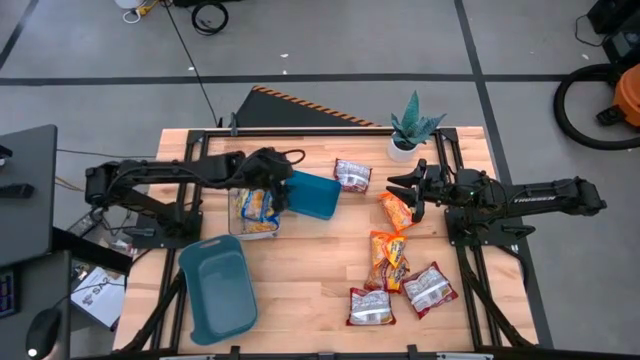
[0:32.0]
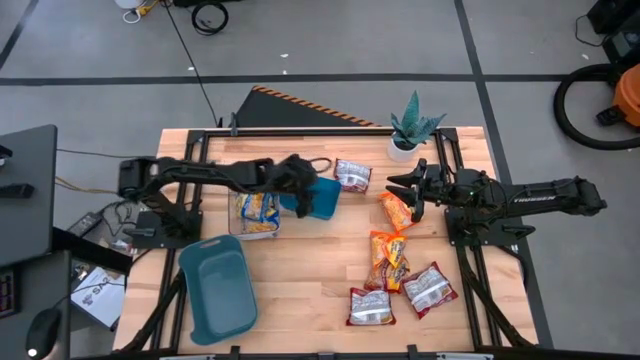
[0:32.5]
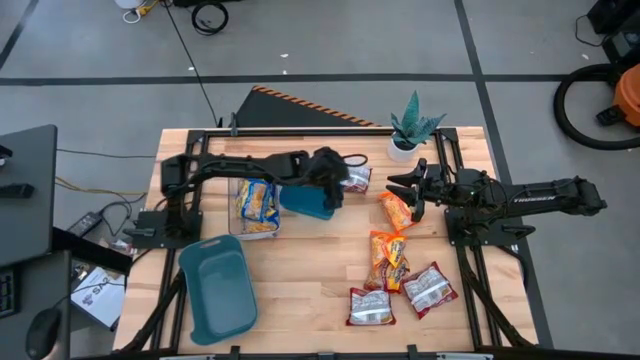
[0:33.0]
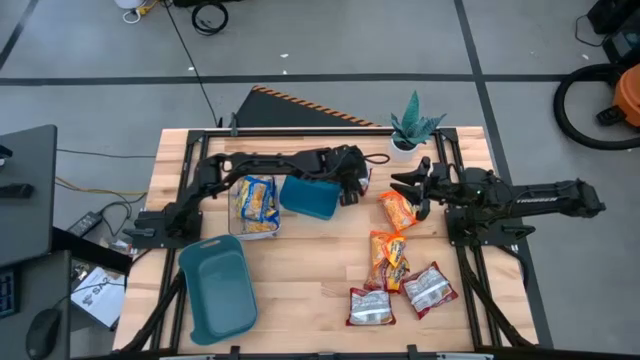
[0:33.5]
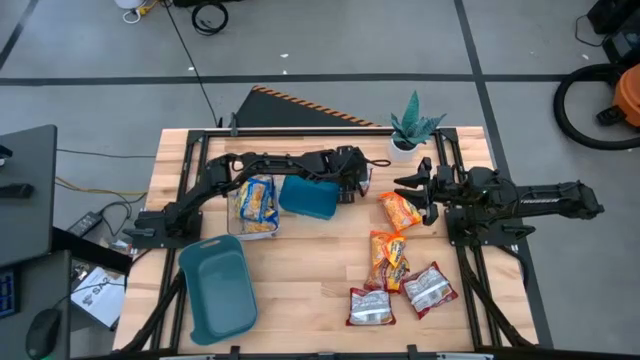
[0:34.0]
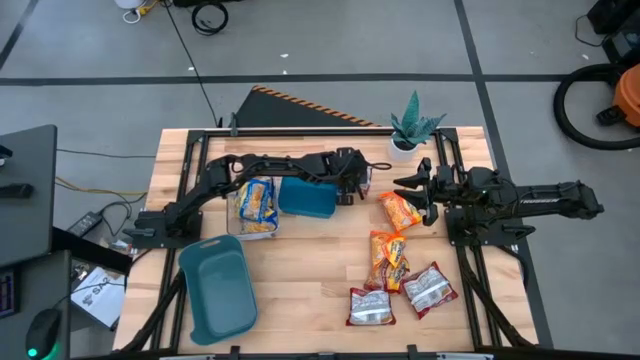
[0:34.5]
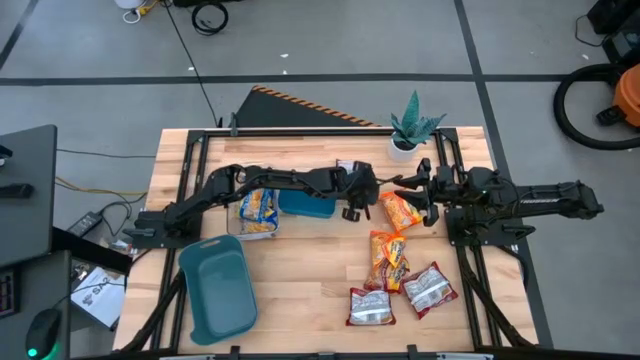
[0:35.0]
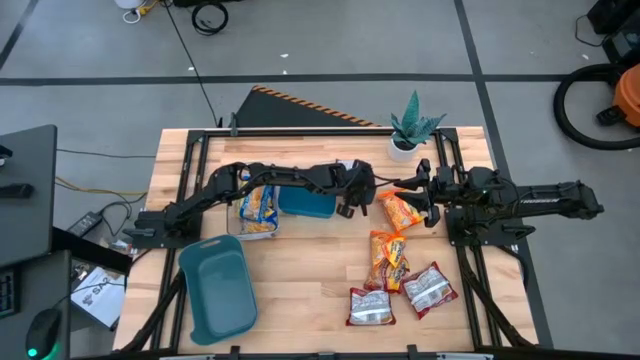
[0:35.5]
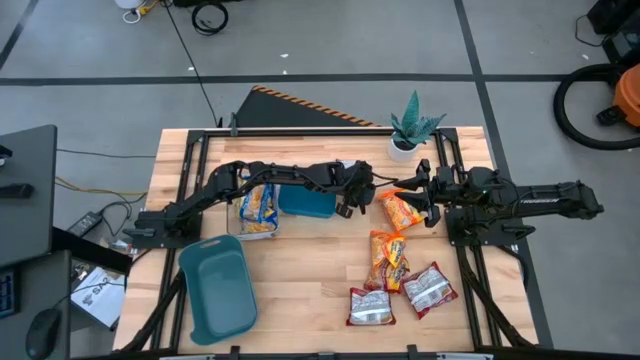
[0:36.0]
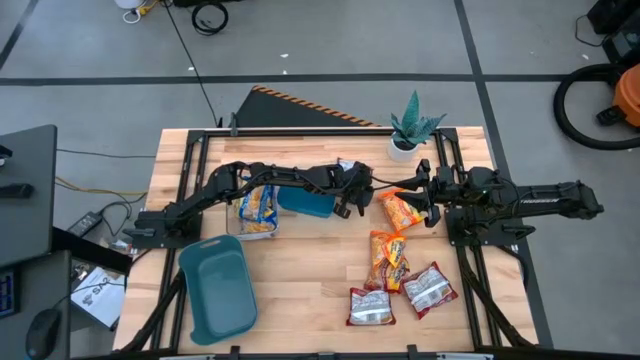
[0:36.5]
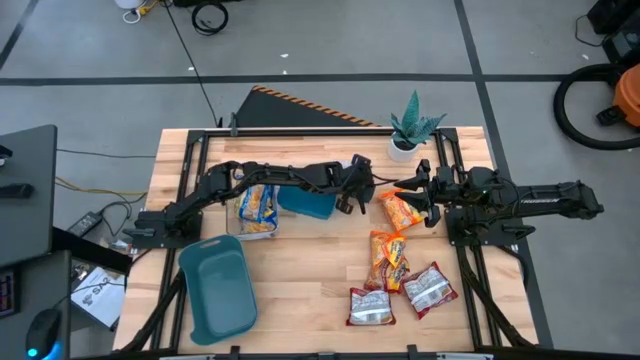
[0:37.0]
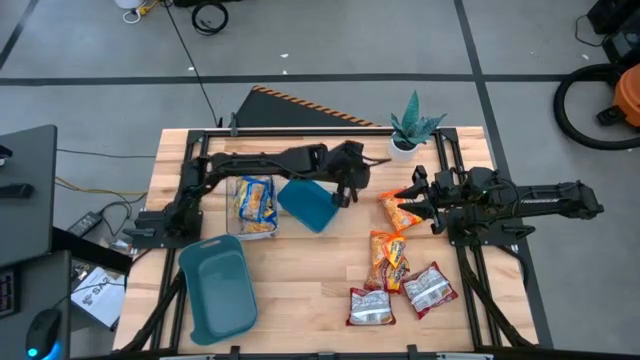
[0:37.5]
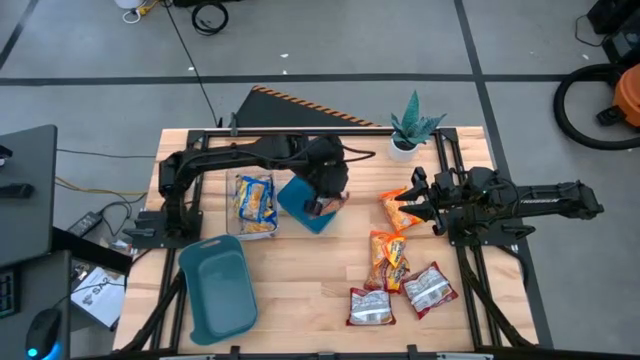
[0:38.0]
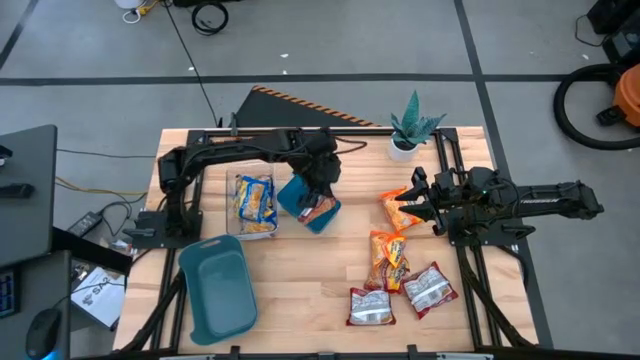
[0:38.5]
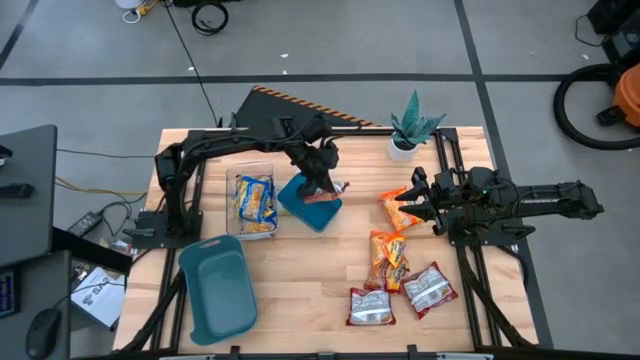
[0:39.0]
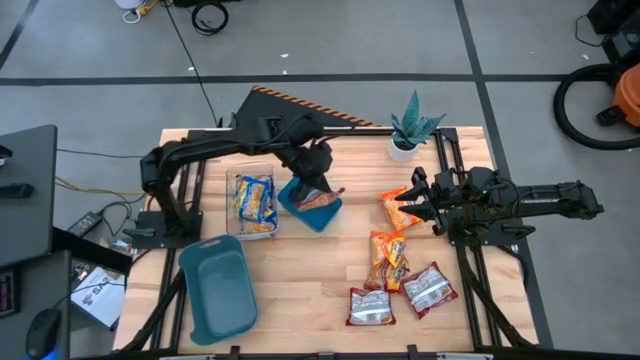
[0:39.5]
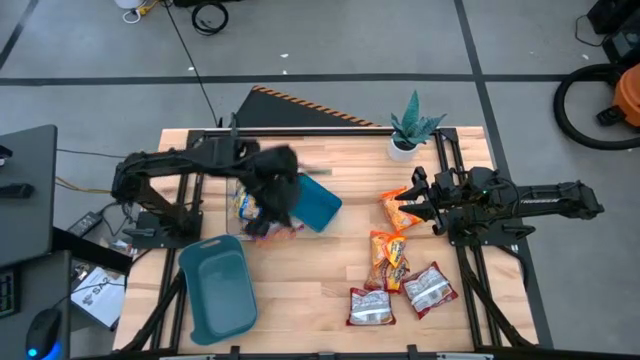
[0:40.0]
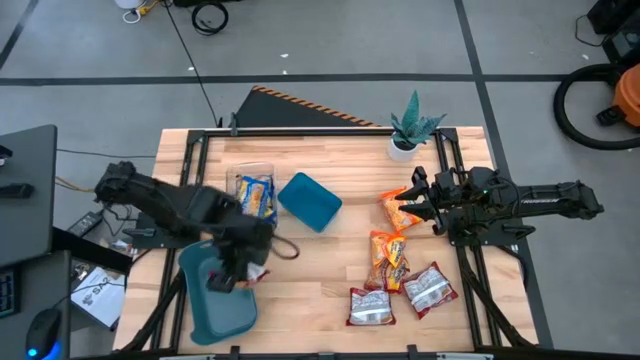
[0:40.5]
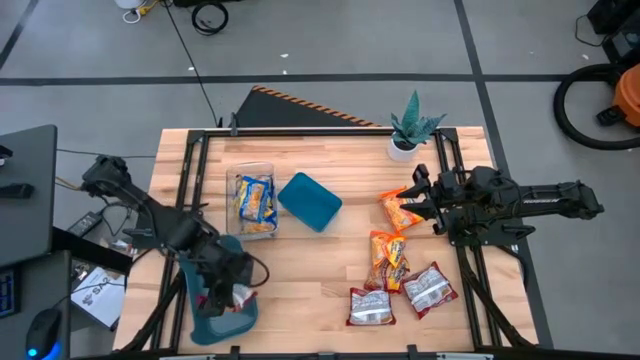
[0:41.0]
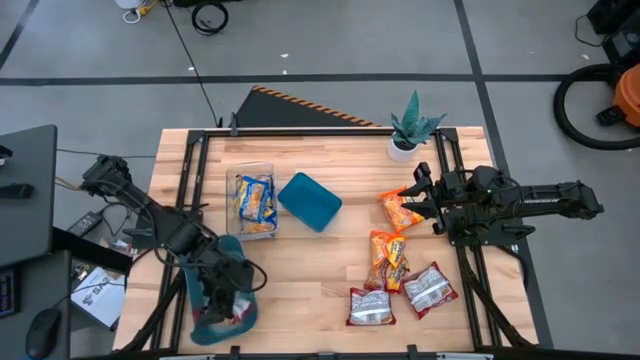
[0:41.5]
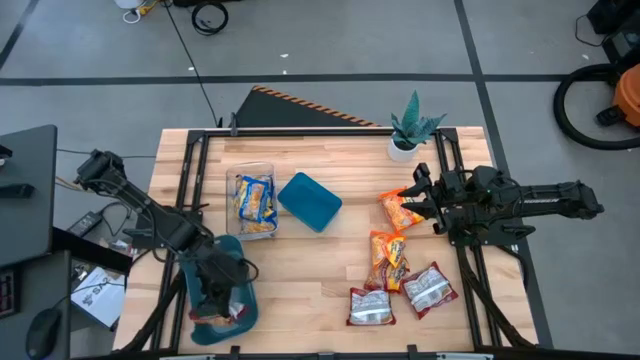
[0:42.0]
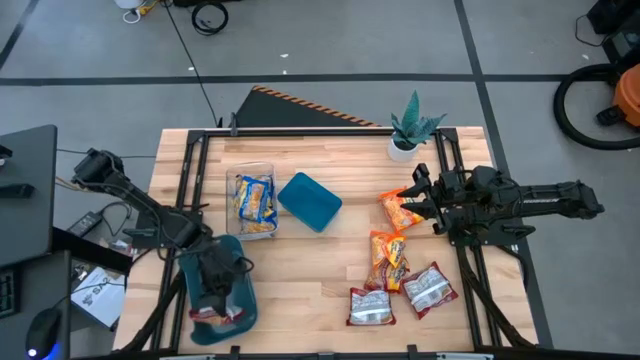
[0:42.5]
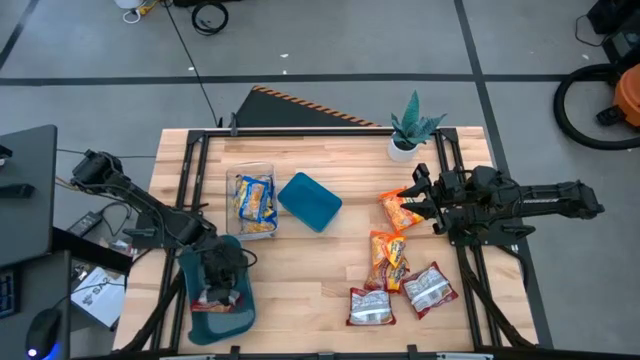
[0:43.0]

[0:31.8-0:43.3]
Task: Sort Maruchan noodles
Put the top red noodle pack into the dark green bin

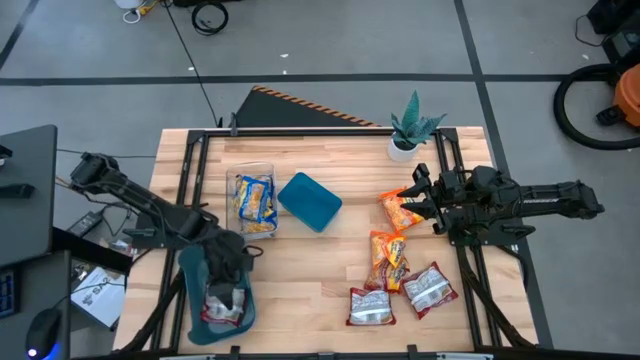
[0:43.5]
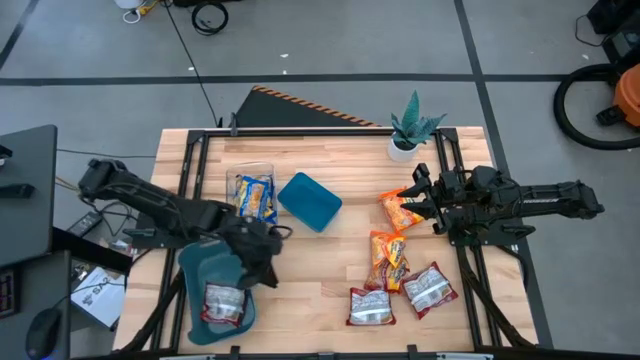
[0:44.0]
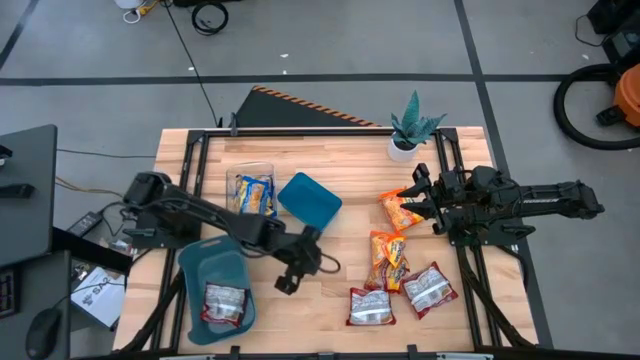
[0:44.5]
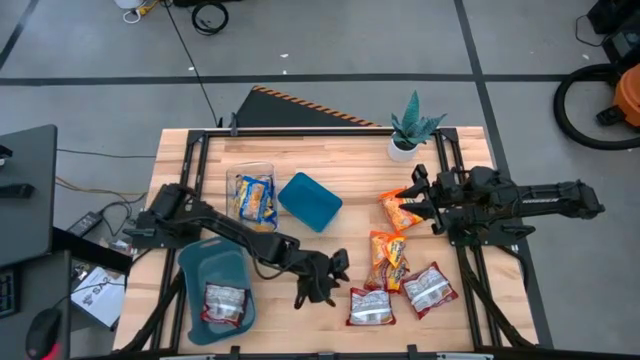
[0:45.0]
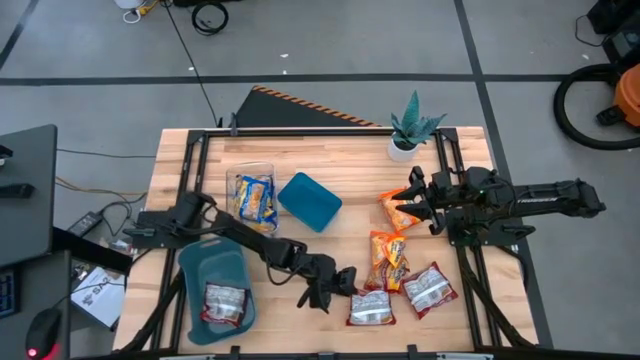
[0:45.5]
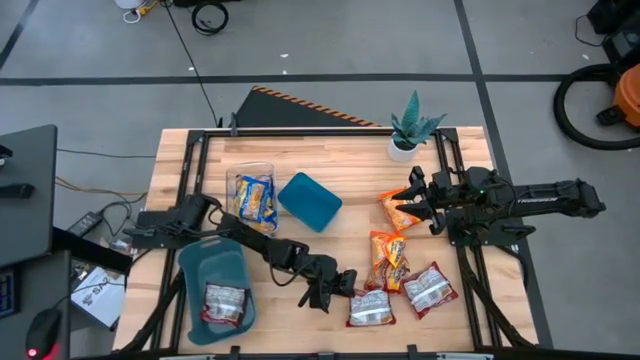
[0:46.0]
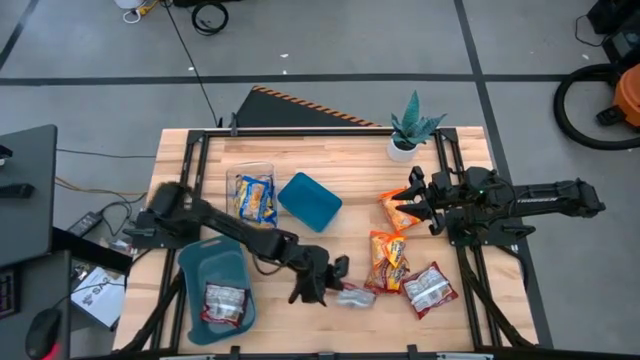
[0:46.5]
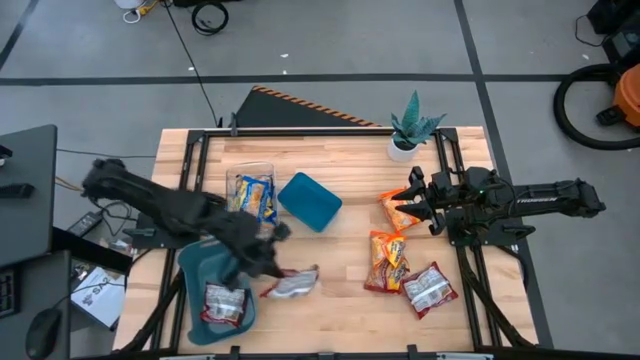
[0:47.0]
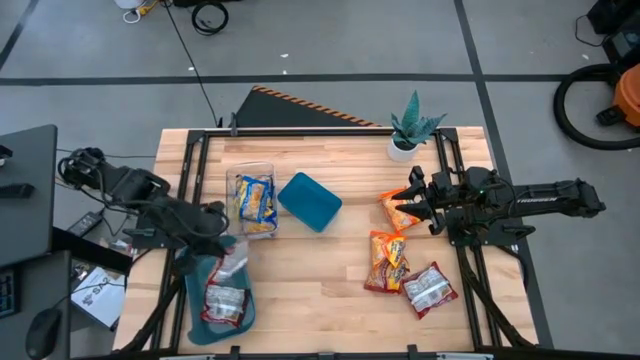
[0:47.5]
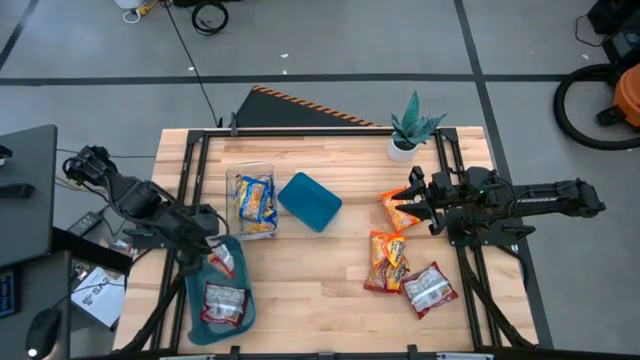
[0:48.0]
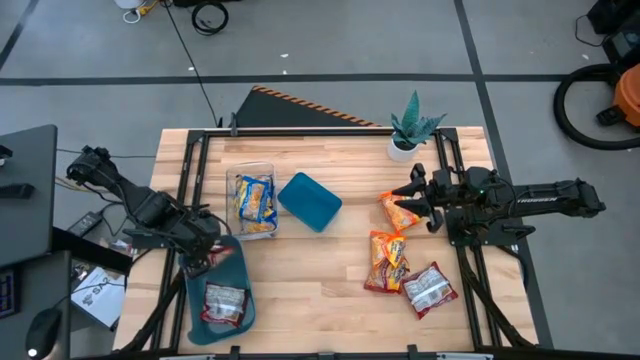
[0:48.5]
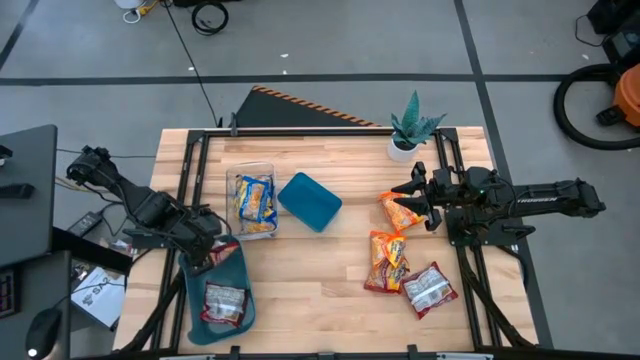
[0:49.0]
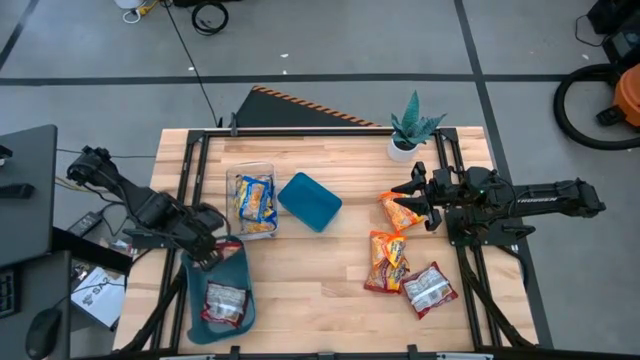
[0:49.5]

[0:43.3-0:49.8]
Put the left red noodle pack into the dark green bin

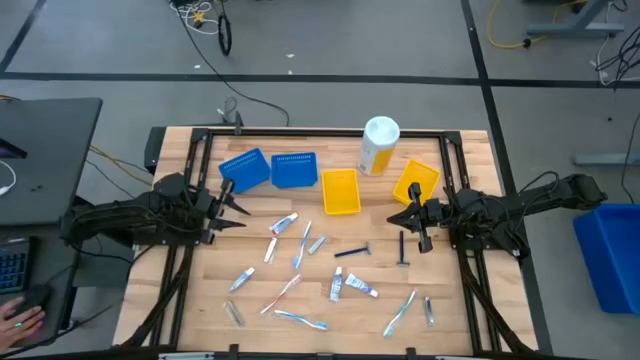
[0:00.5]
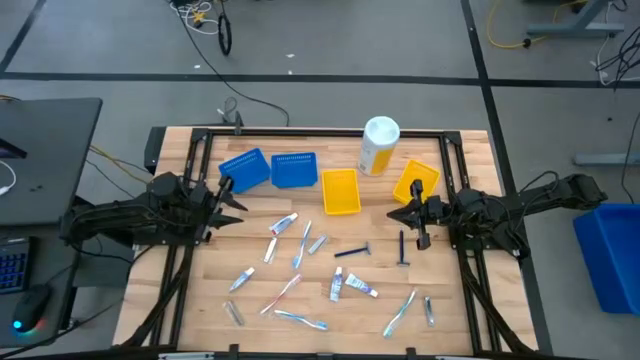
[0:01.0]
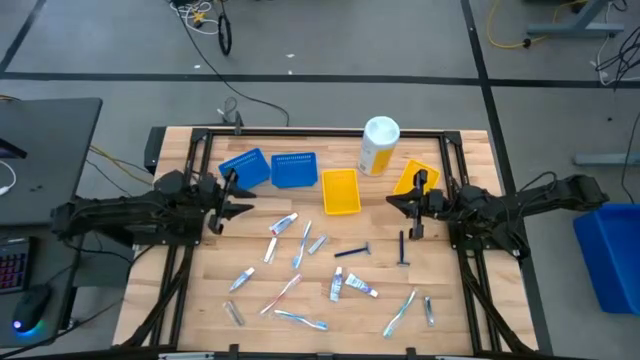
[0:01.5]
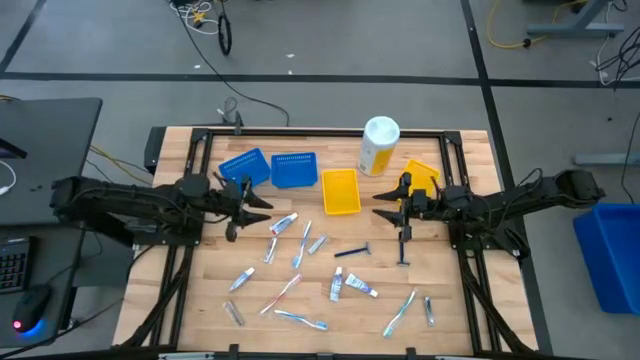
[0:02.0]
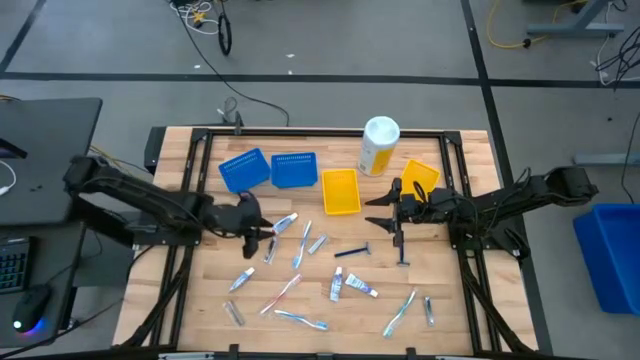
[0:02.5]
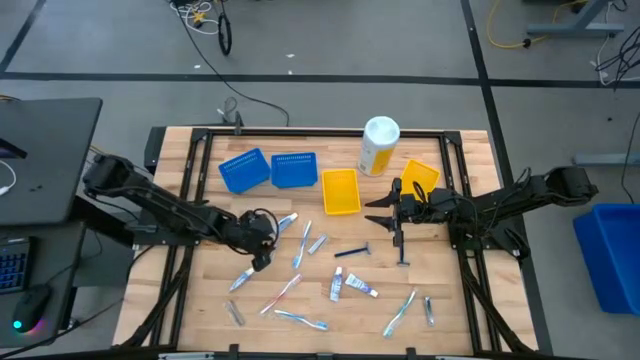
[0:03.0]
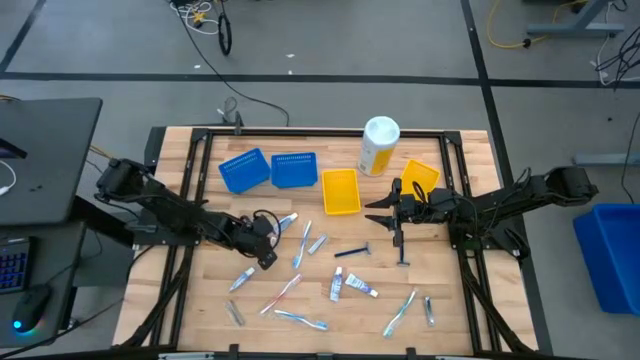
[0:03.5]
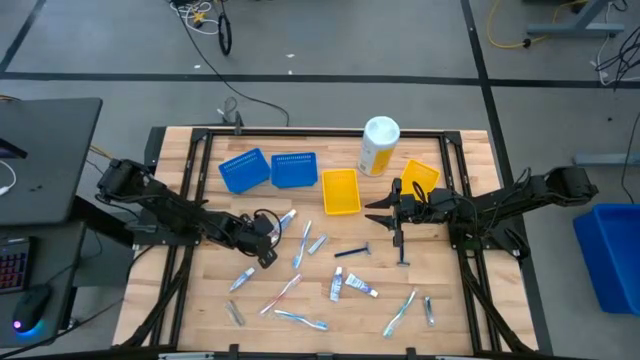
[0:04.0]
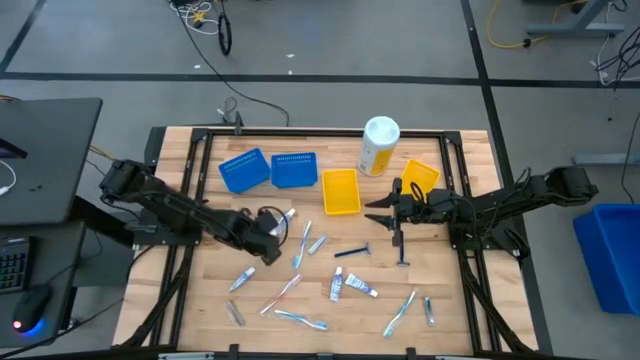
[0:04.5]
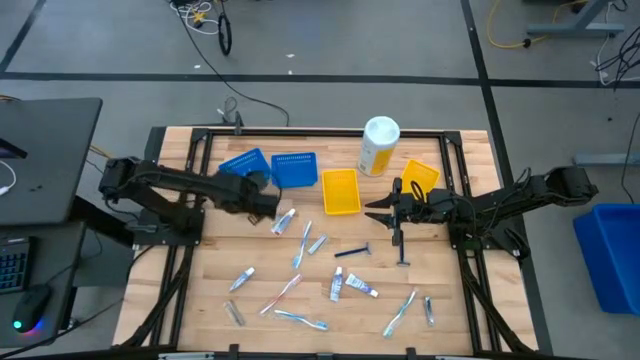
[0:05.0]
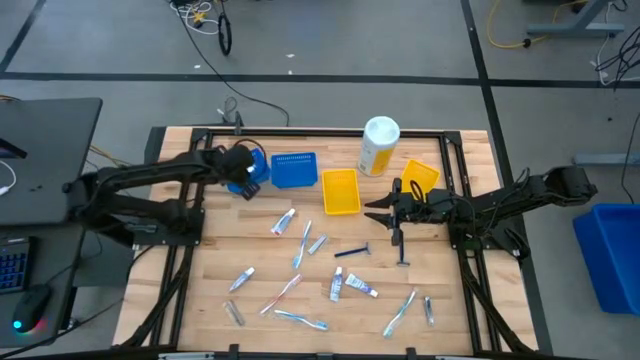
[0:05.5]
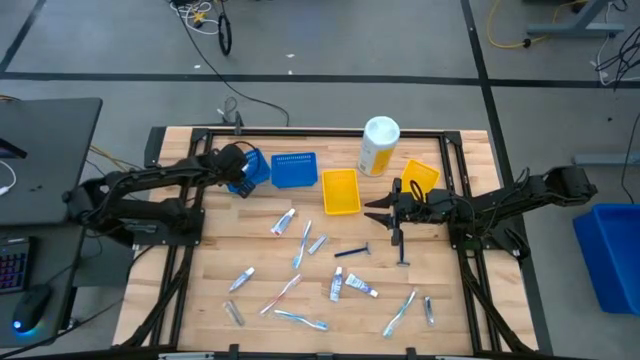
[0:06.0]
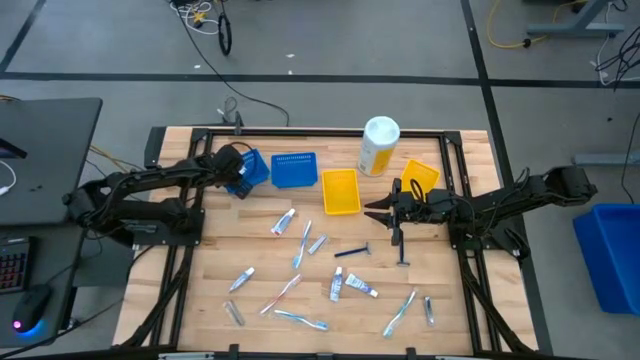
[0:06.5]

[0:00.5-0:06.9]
Task: Pick & Place Travel size toiletries
Put the silver nail cutter into the left blue bin
